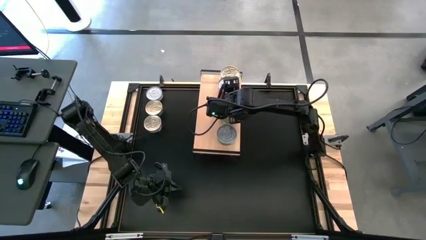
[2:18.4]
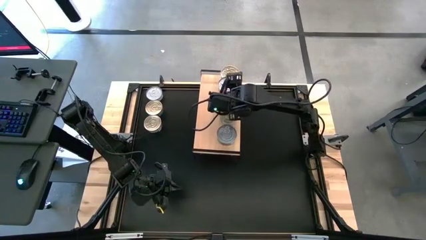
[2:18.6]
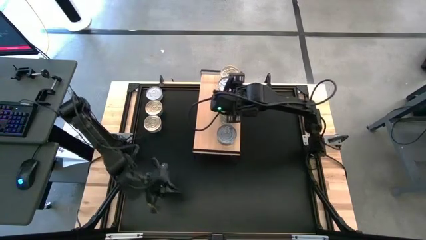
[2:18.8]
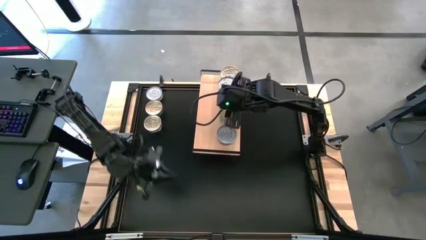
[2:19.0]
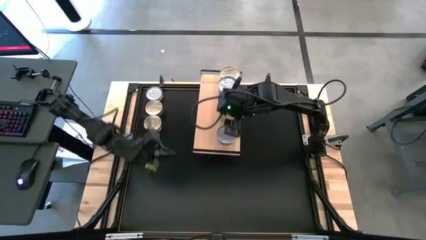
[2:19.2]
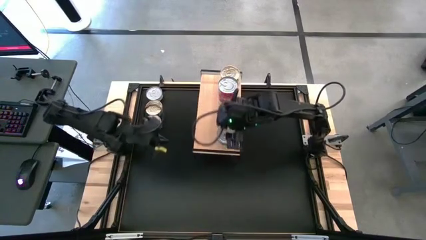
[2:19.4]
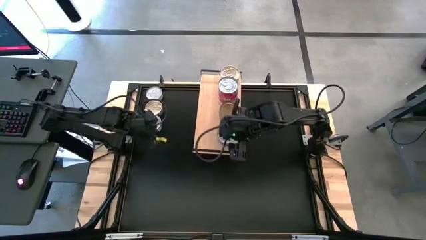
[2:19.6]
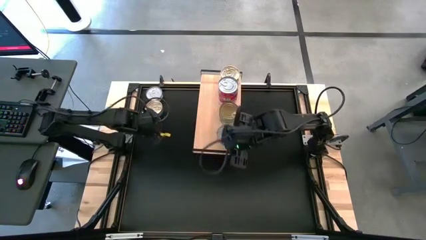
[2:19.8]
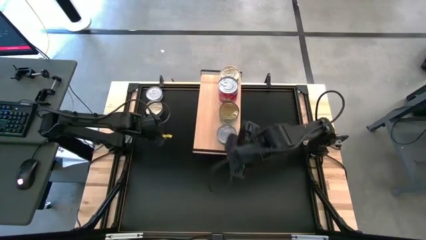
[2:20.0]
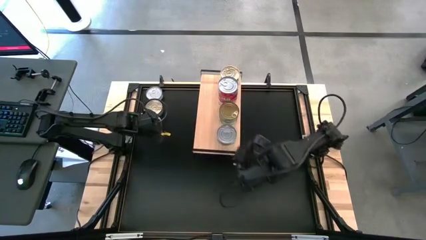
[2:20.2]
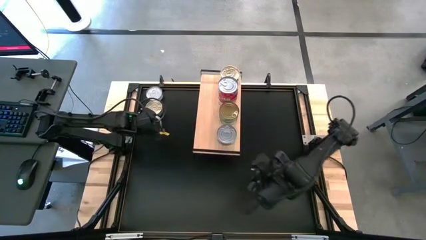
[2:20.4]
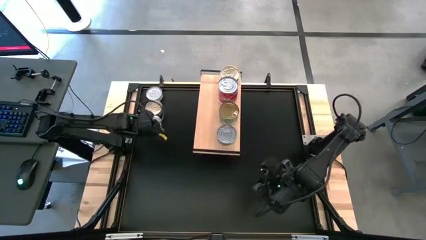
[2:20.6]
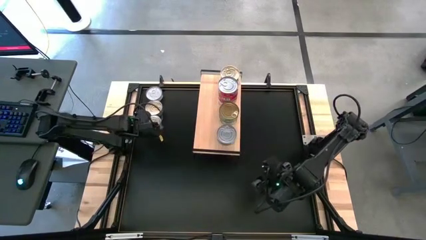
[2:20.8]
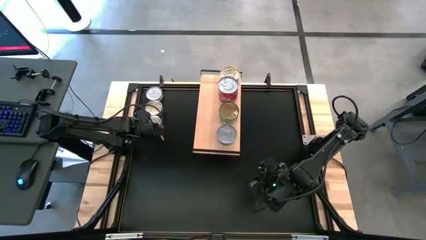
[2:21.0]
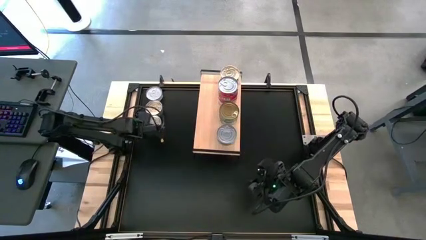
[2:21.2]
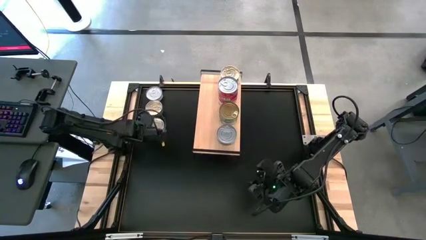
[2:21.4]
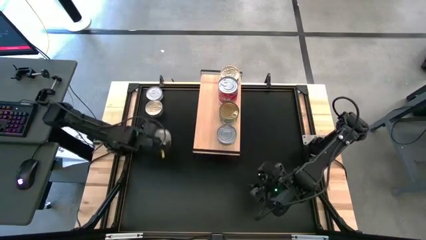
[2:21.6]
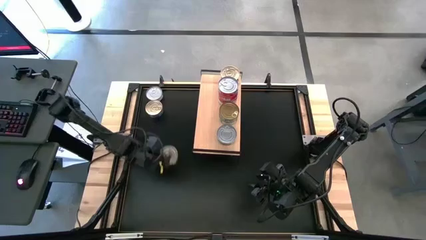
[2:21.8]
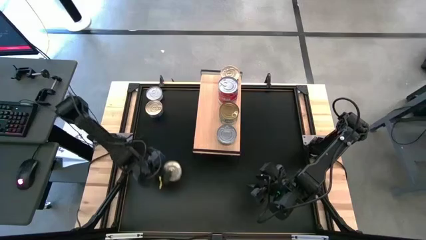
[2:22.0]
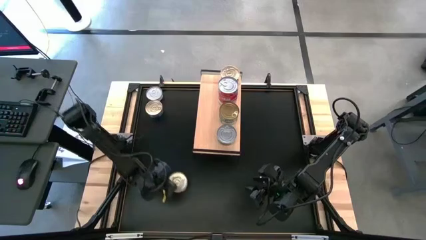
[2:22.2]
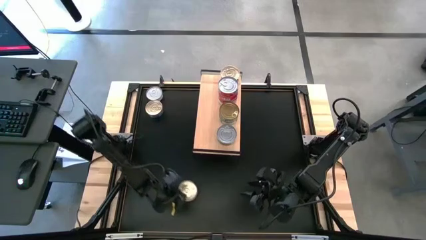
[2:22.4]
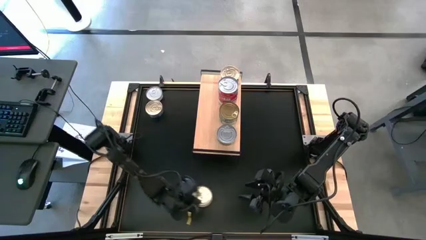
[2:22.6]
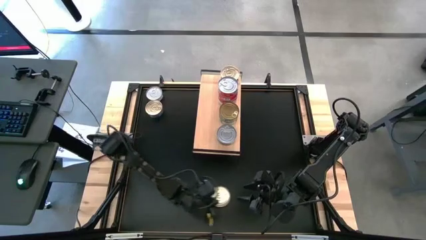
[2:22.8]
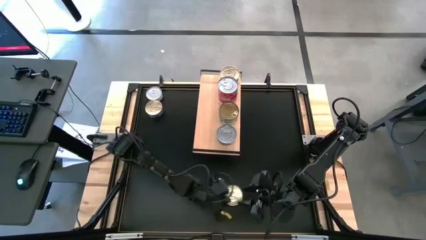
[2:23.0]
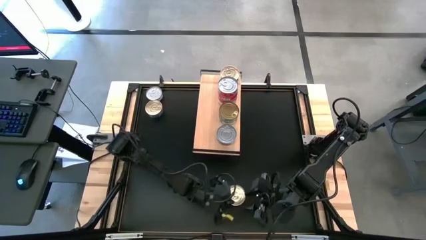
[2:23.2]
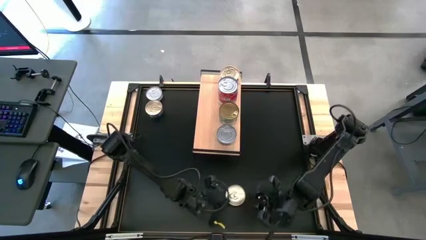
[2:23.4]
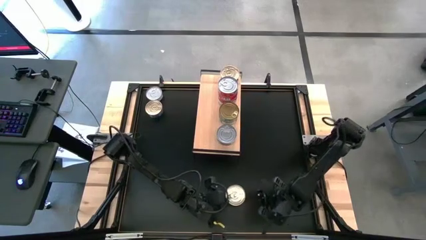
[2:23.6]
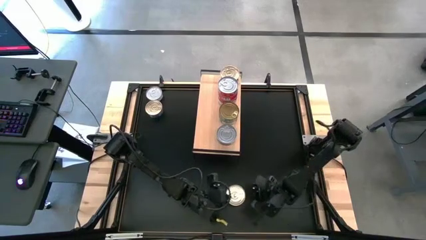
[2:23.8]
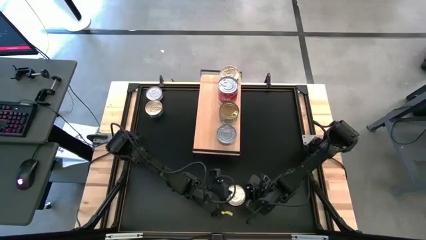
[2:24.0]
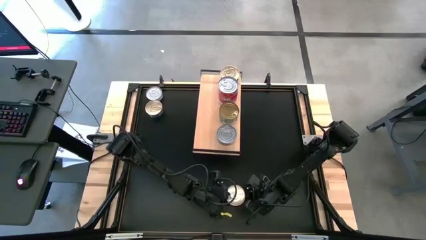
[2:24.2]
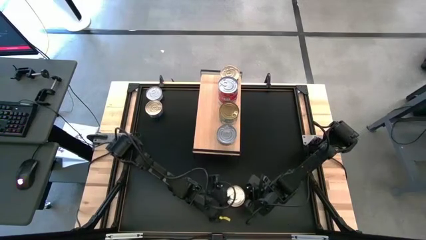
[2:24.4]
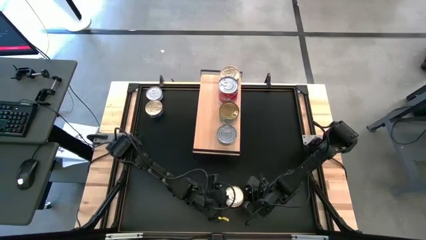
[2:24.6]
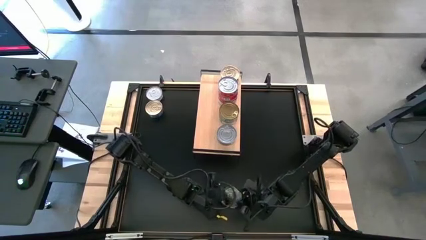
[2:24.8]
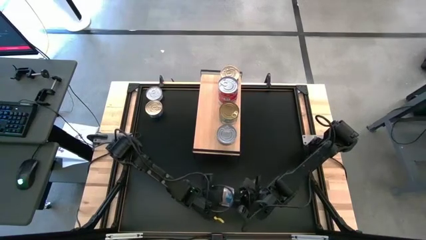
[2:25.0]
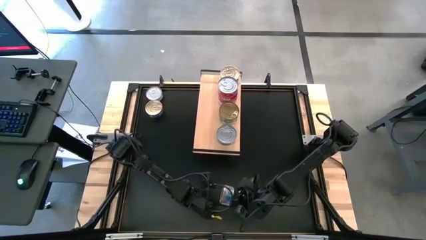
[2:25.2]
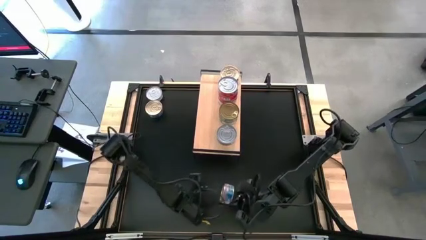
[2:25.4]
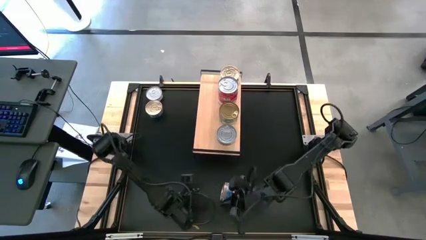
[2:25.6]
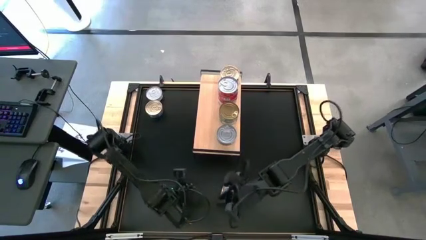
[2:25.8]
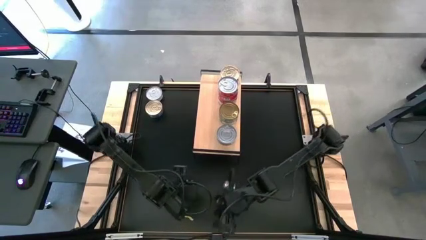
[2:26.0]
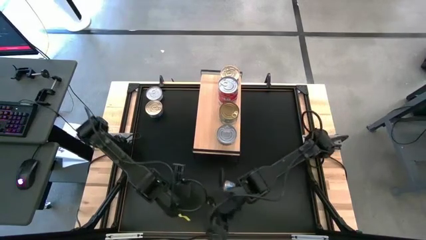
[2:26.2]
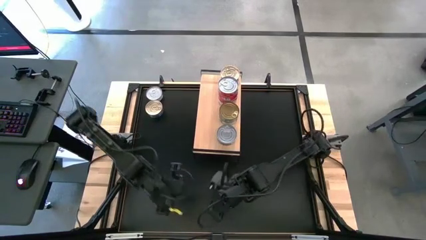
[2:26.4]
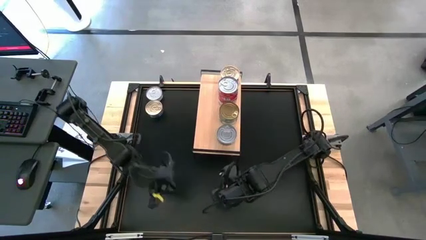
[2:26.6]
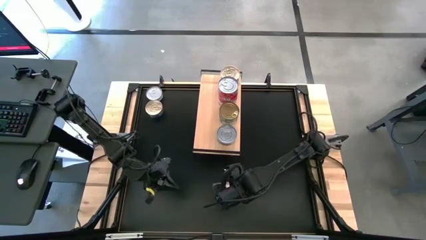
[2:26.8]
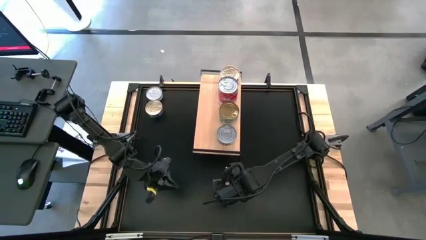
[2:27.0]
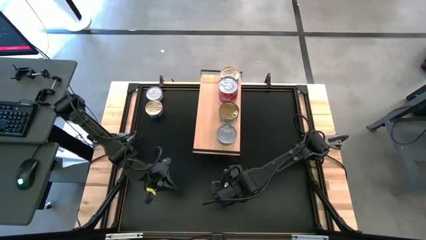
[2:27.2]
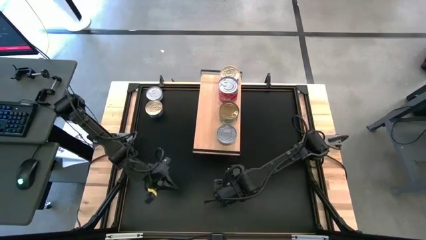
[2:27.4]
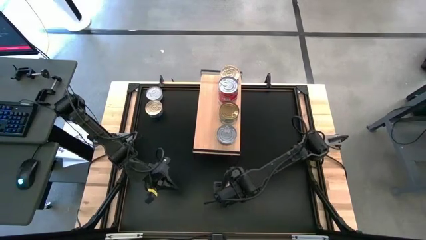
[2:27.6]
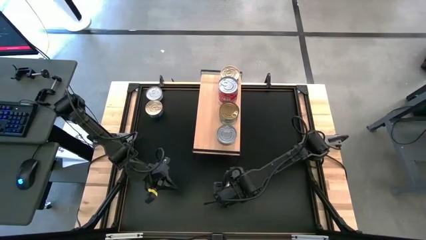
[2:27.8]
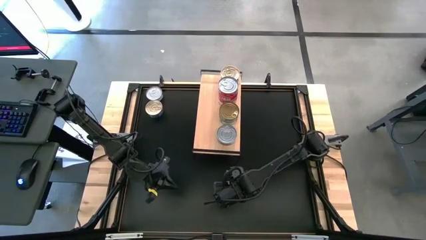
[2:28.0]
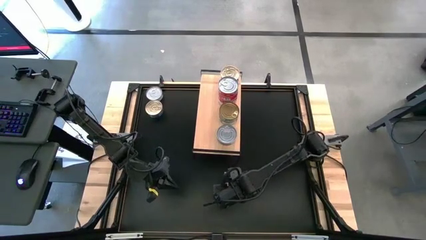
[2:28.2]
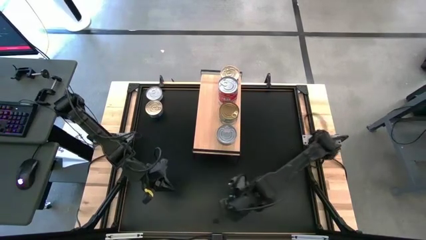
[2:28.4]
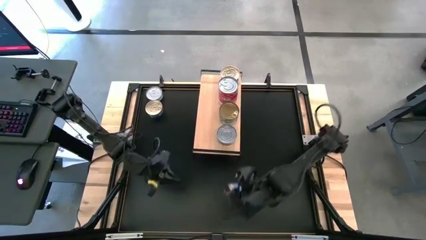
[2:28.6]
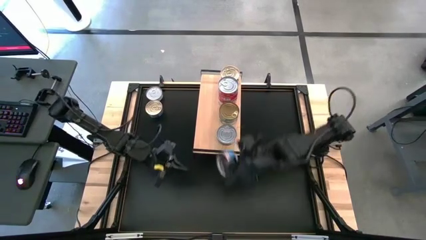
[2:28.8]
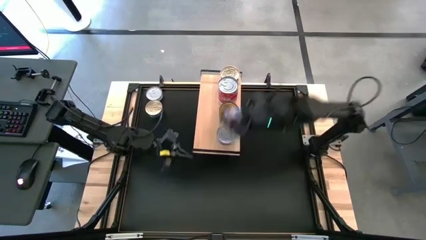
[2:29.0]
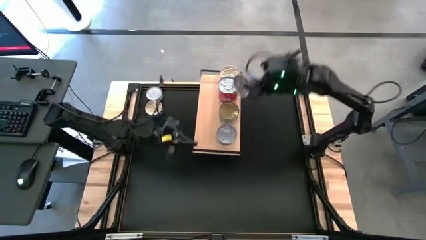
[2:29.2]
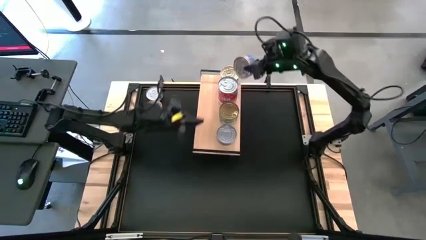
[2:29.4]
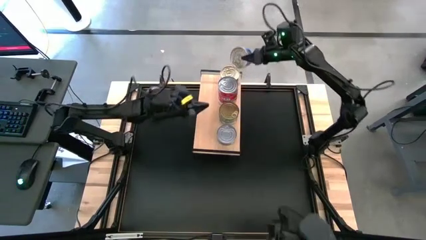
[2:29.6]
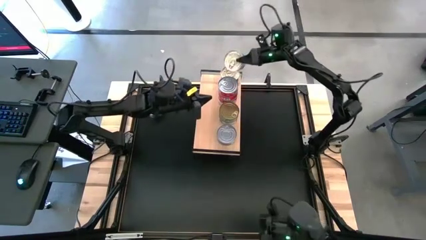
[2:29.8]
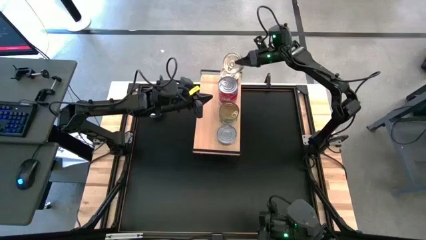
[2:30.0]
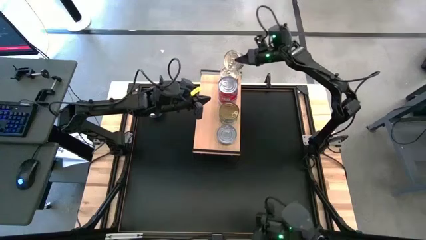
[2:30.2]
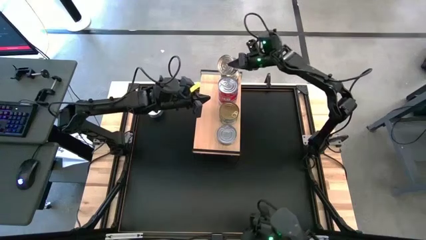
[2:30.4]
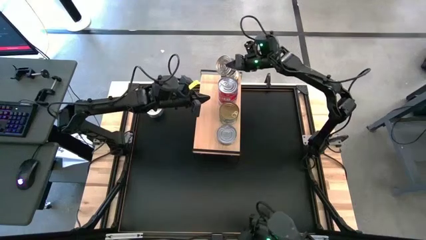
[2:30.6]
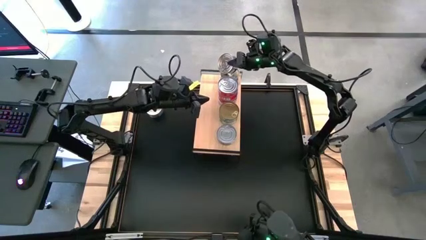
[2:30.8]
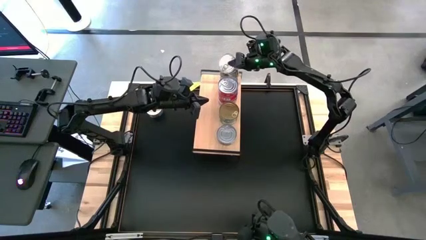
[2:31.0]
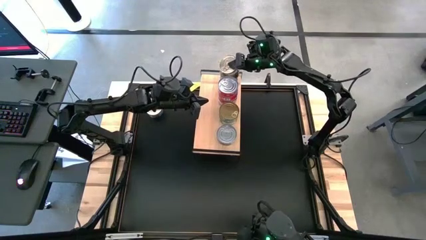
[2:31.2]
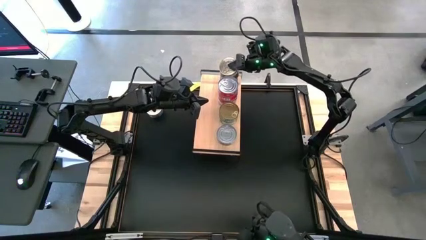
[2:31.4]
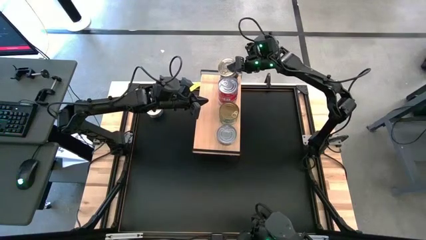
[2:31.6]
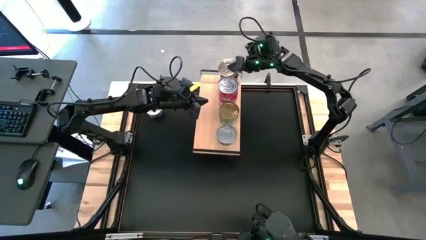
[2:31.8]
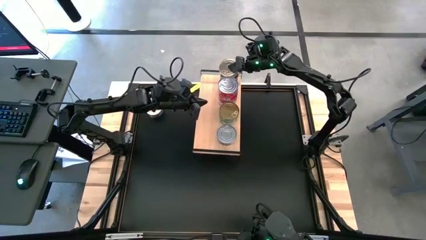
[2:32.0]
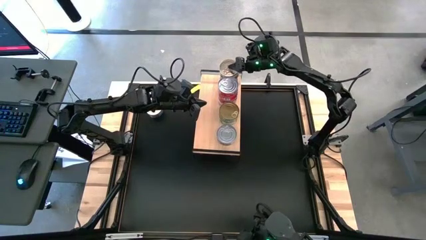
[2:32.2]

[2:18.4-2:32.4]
Task: Stack canned seafood by type on shelf
Stack the blue-pink tuna can on top of the blue-pink tuna can on the shelf

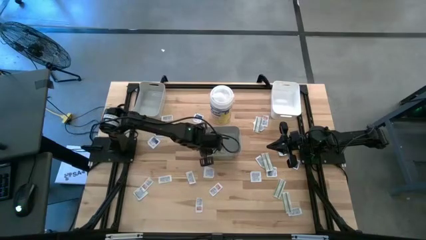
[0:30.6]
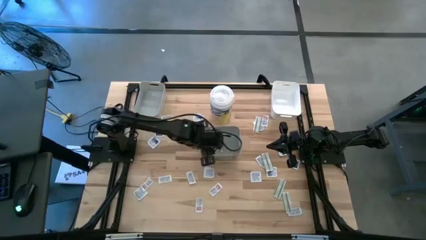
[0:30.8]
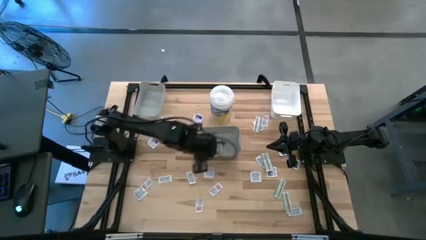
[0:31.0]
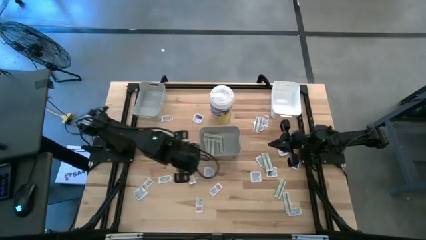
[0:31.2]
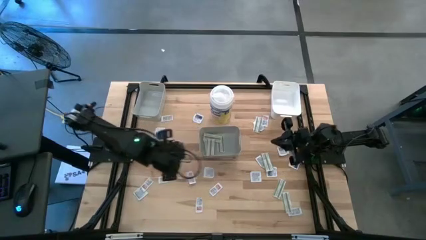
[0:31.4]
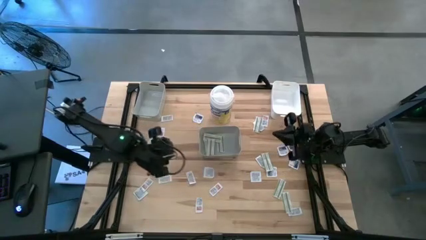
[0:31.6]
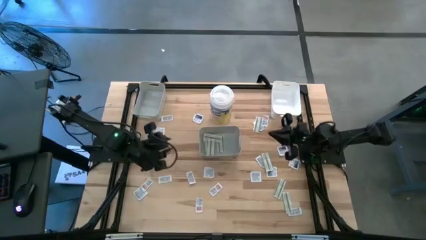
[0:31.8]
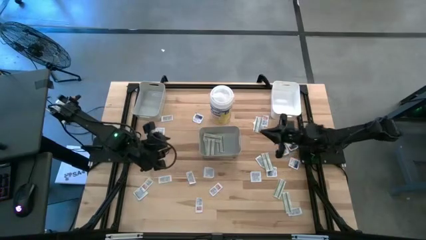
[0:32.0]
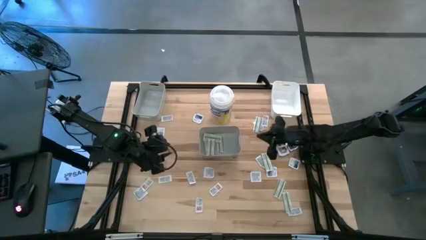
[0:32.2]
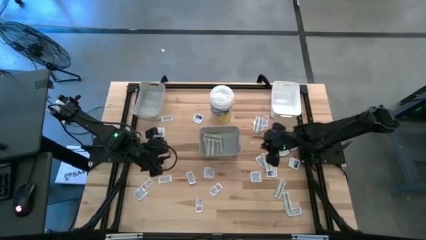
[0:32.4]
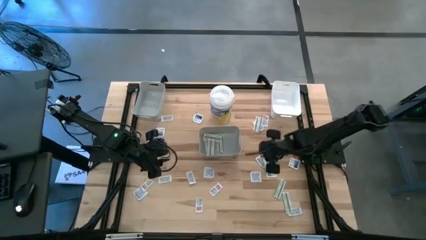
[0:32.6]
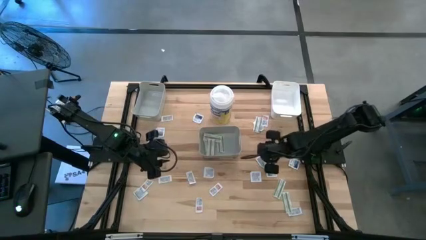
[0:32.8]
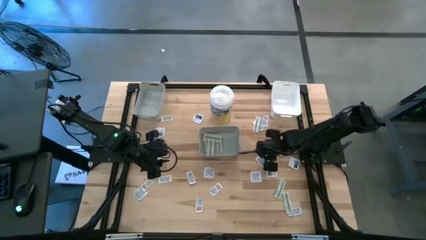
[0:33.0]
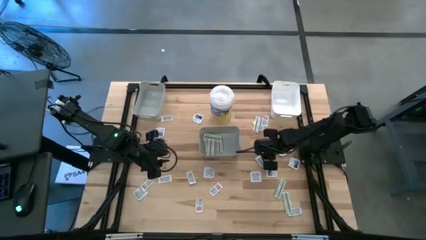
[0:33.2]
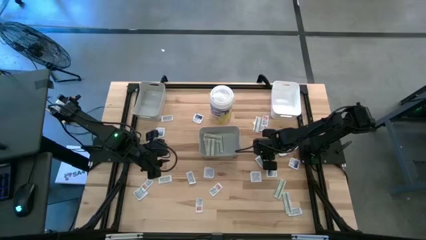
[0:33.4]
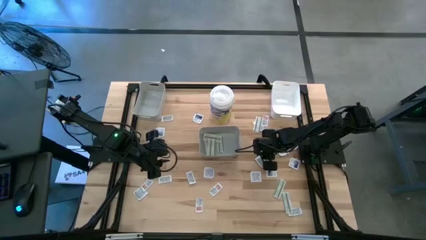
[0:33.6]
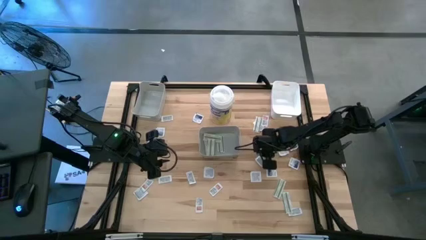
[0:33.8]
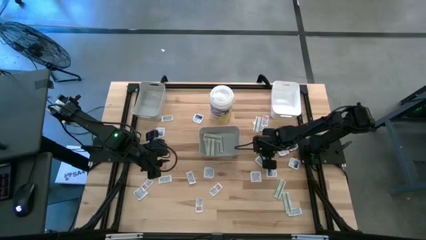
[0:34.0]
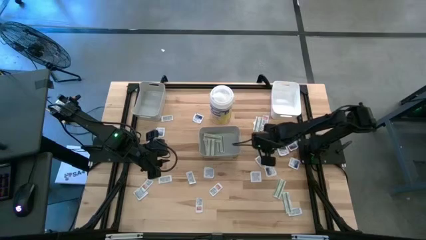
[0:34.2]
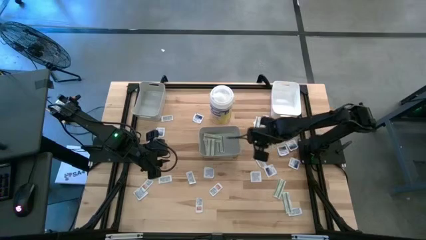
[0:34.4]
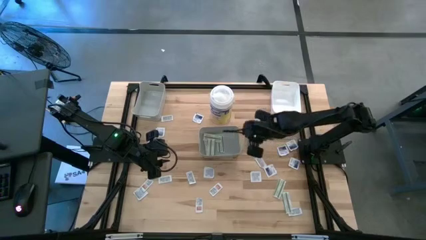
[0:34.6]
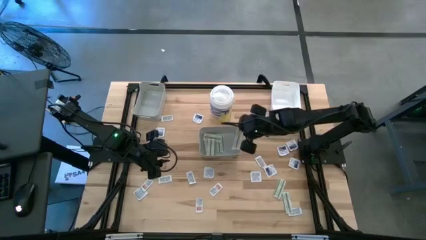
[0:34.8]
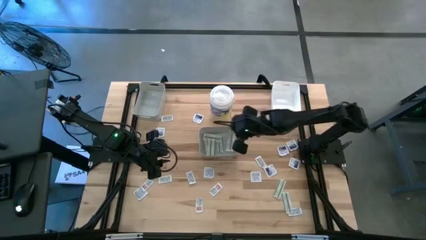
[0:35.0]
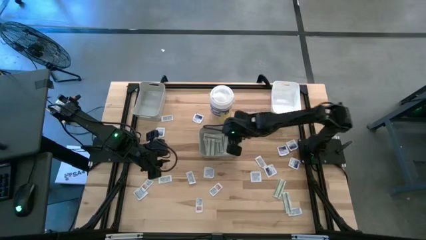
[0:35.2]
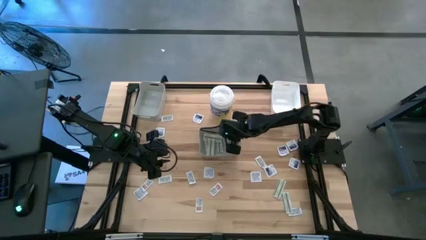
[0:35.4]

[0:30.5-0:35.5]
Task: Pick & Place First Aid Supplies
Put the bandage into the bottom gray bin
